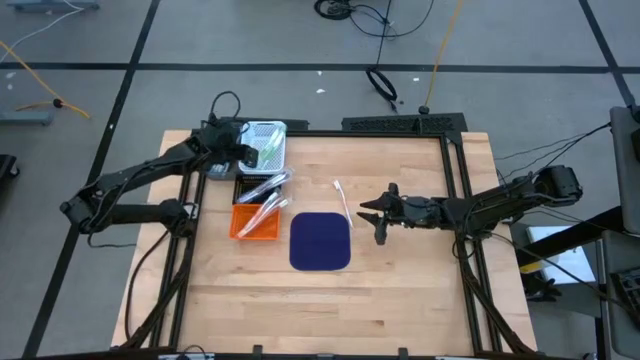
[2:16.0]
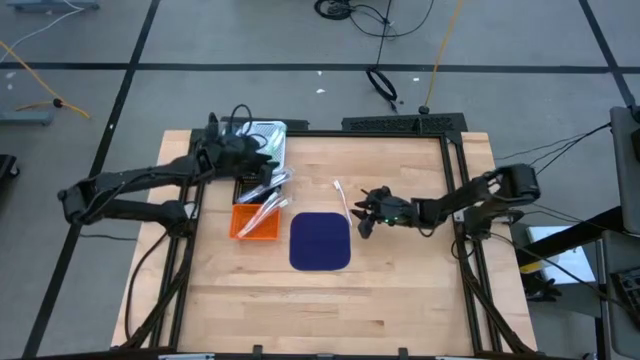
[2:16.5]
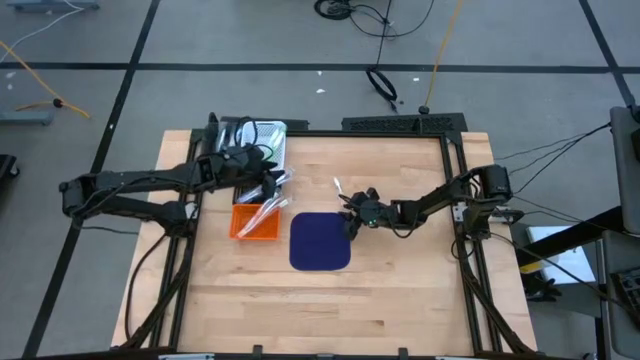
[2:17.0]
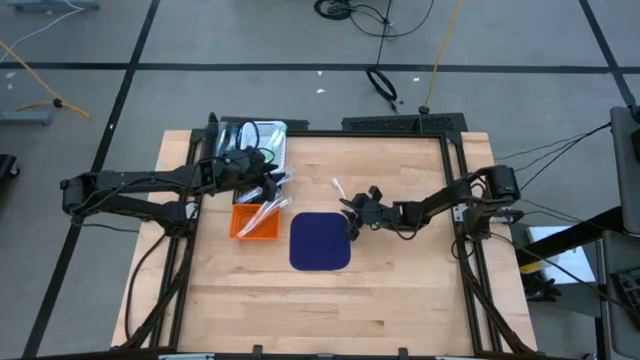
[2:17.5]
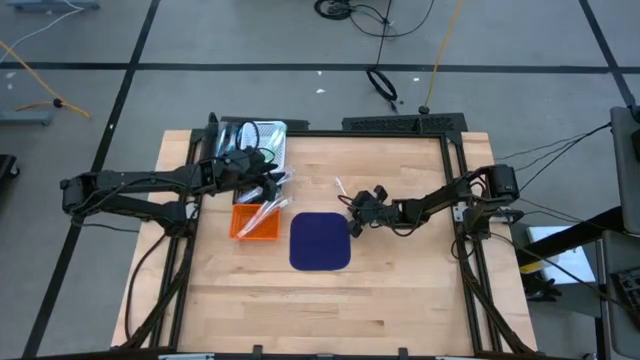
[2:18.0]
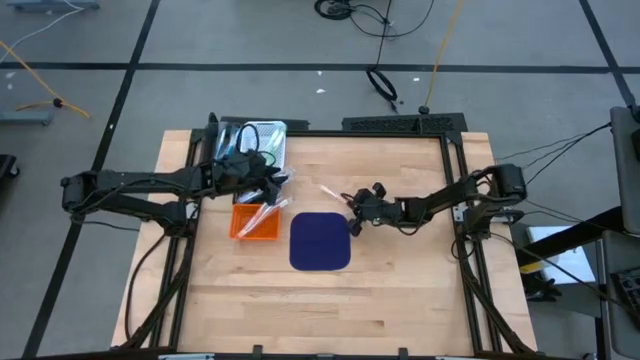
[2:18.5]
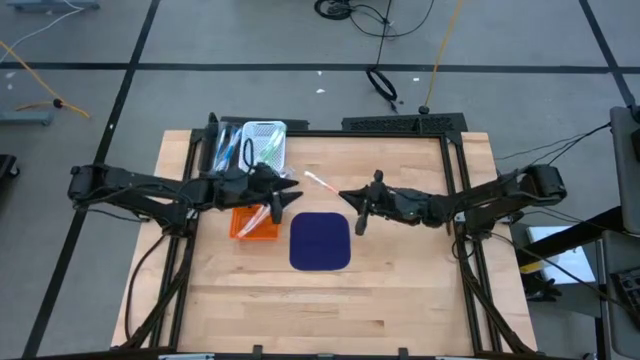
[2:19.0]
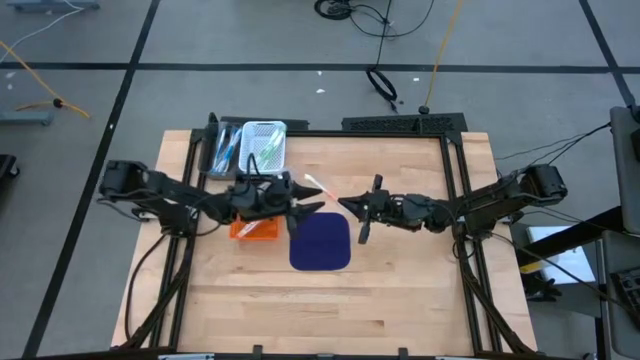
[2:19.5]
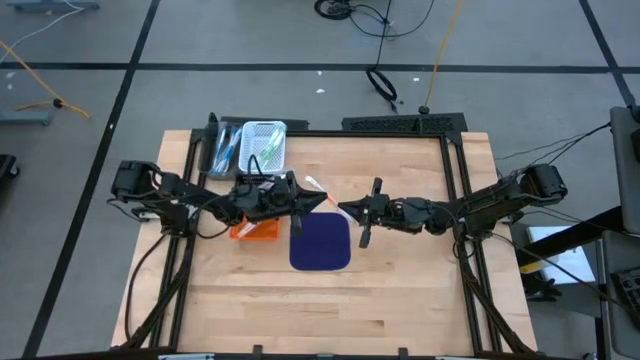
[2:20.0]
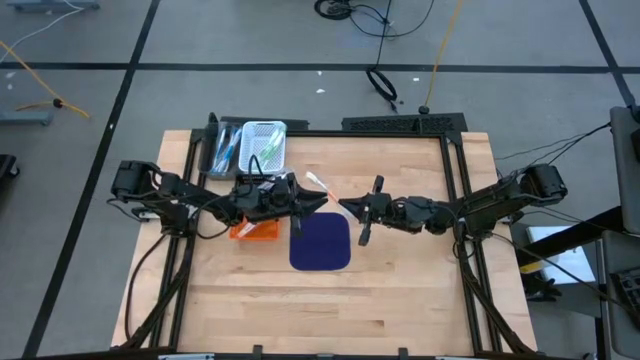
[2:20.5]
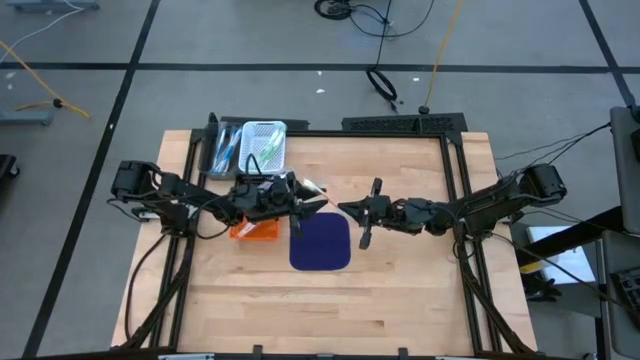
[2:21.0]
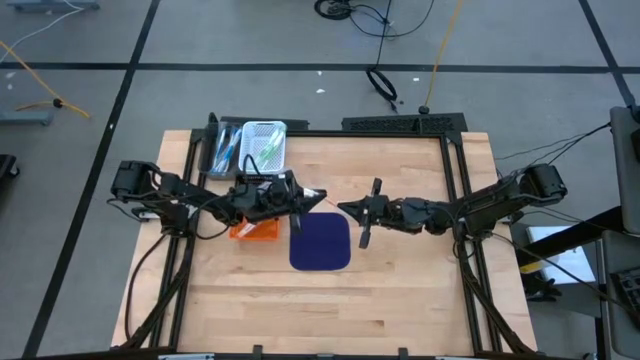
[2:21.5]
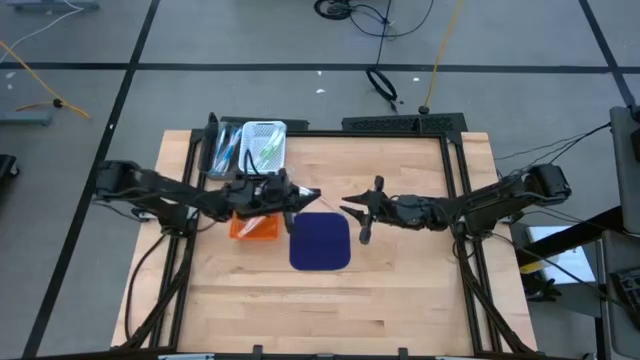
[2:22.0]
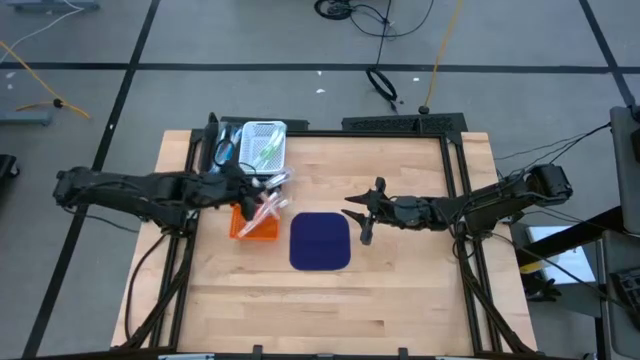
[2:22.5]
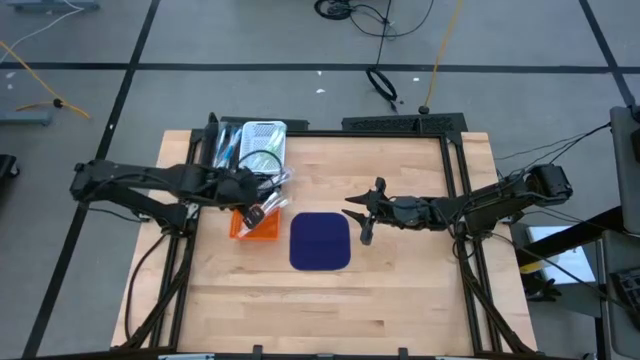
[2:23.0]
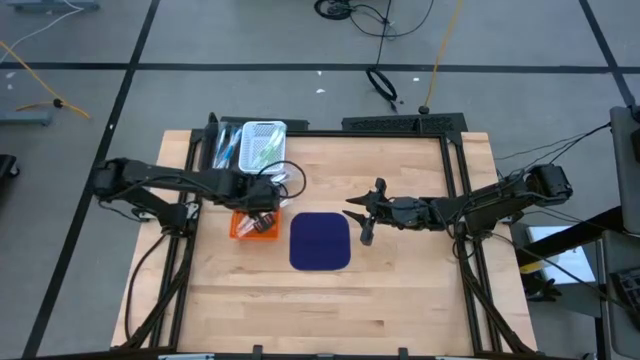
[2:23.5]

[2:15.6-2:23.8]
Task: Pick & Place Toothbrushes
Put the orange toothbrush into the orange bin

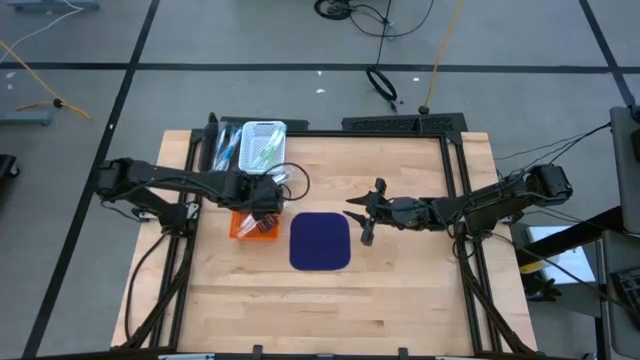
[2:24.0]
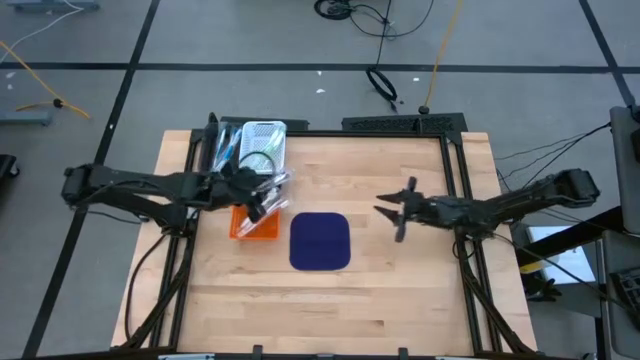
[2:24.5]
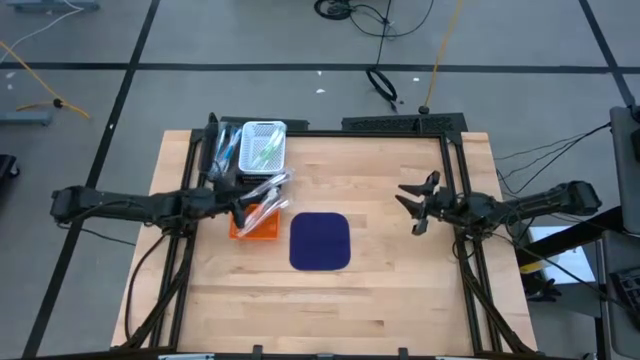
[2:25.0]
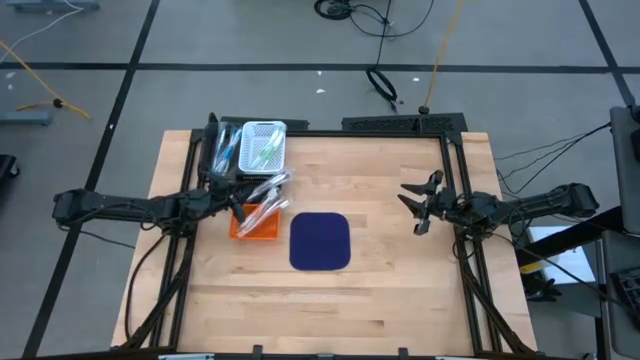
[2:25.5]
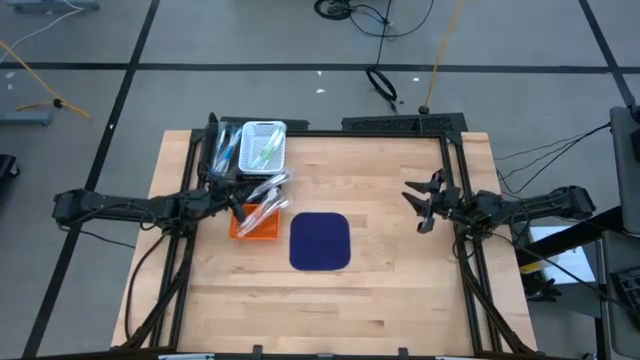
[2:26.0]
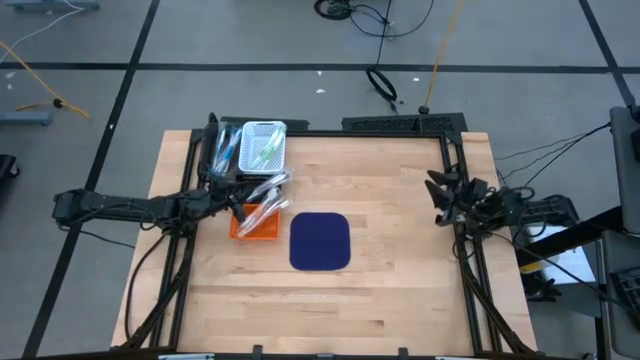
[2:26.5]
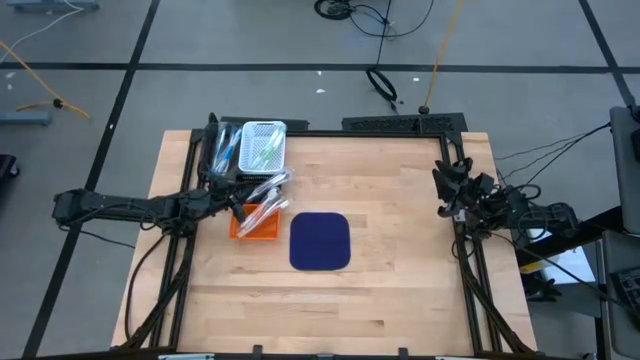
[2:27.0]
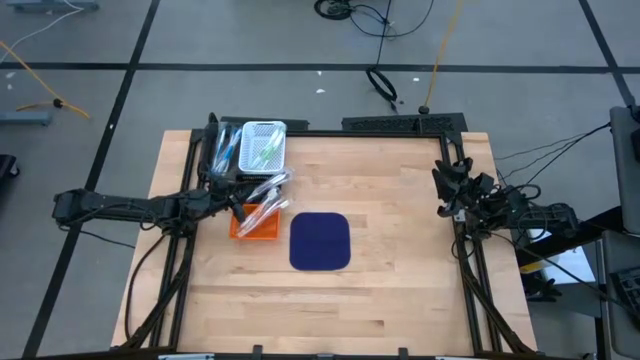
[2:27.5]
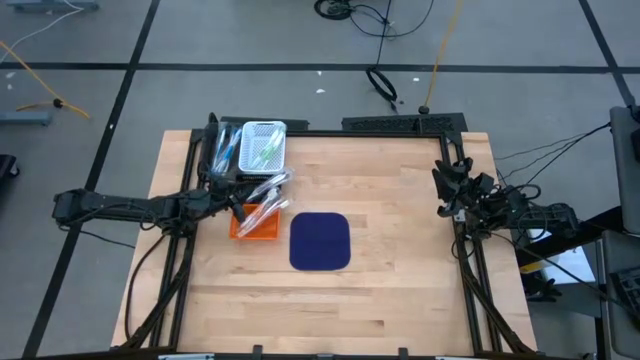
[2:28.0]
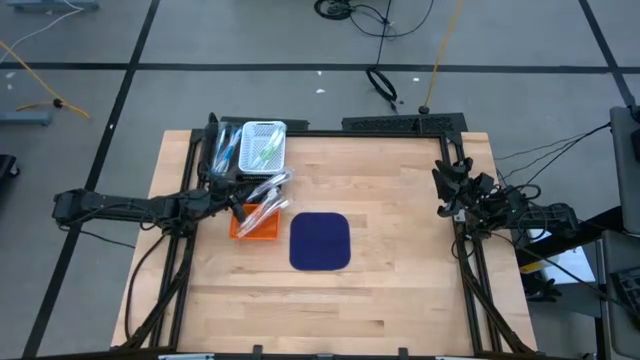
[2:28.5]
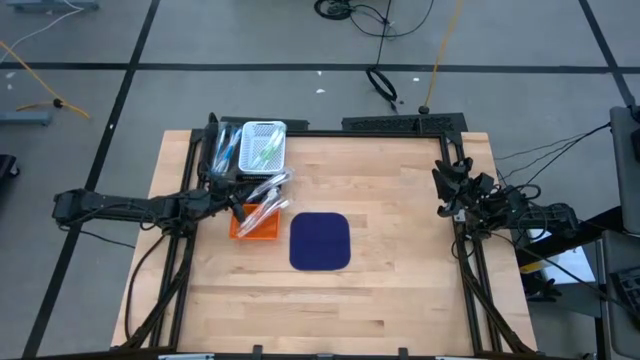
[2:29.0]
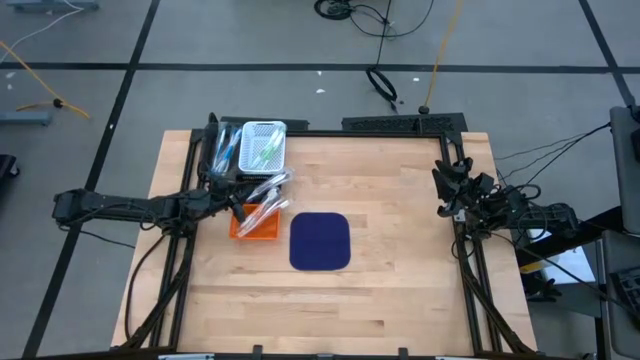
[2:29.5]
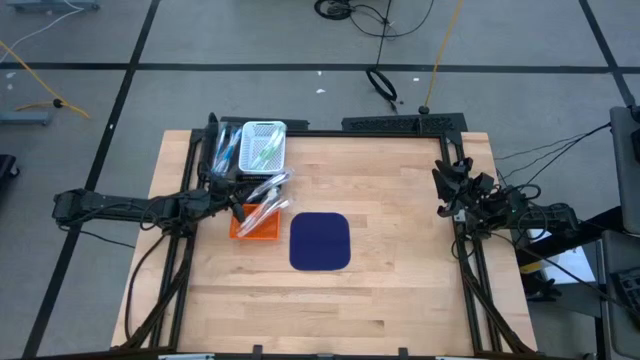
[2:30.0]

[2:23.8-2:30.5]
Return to Home Position

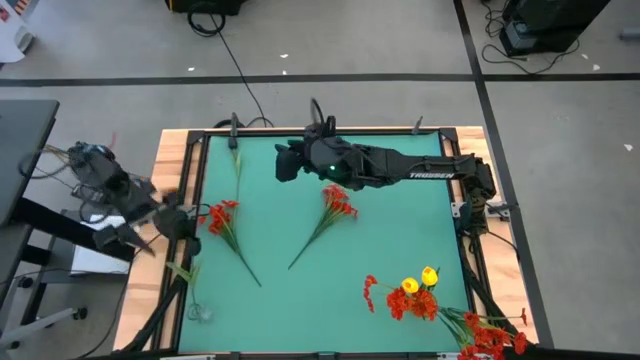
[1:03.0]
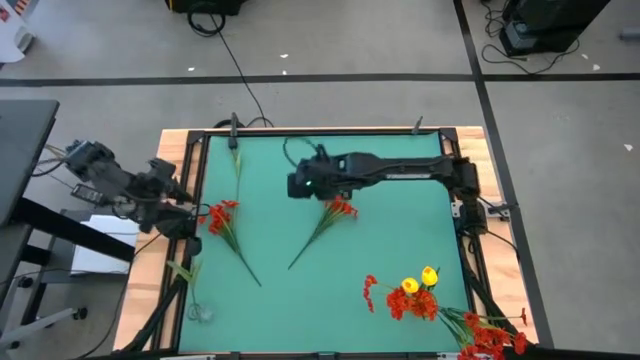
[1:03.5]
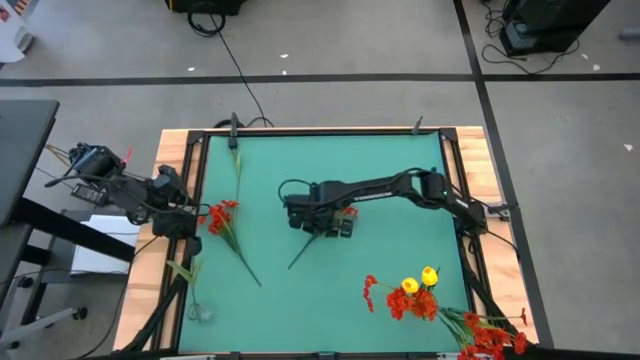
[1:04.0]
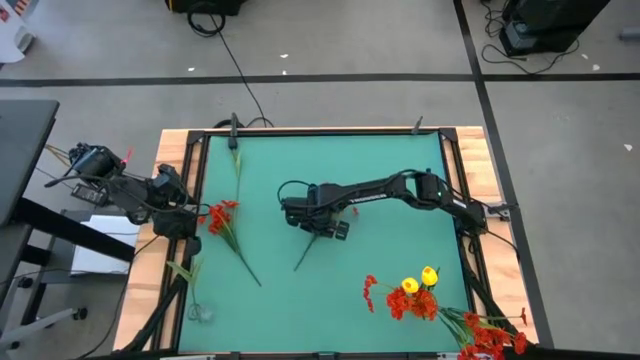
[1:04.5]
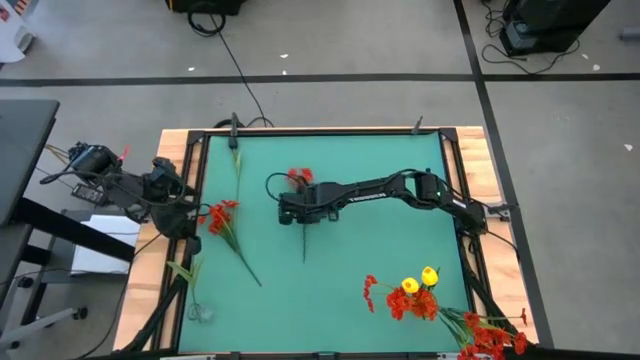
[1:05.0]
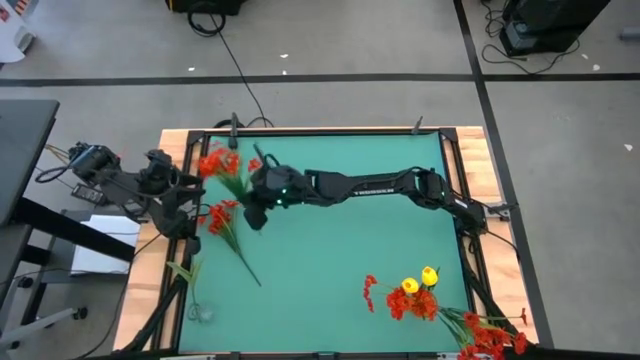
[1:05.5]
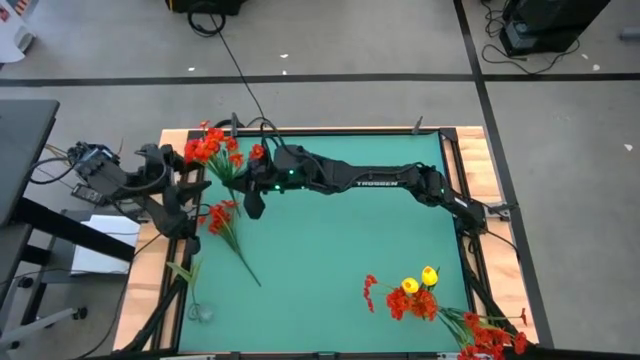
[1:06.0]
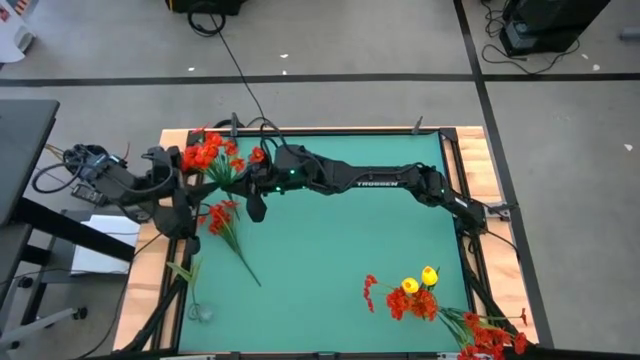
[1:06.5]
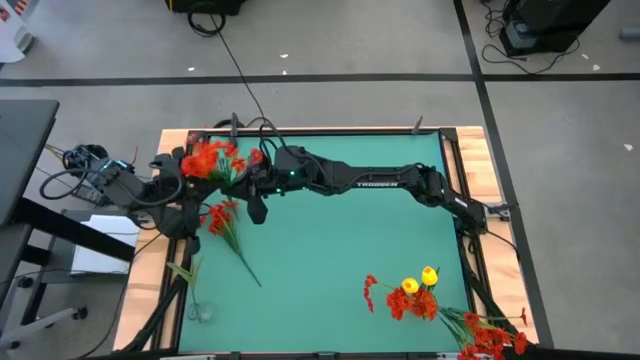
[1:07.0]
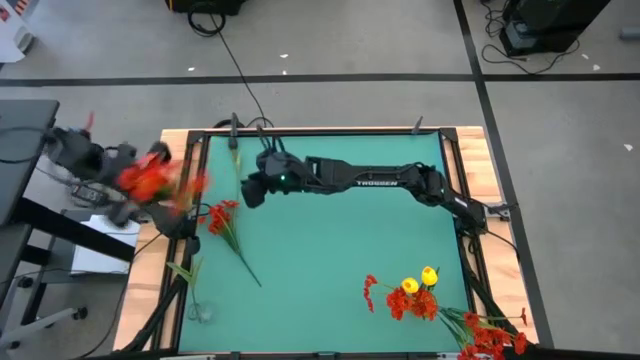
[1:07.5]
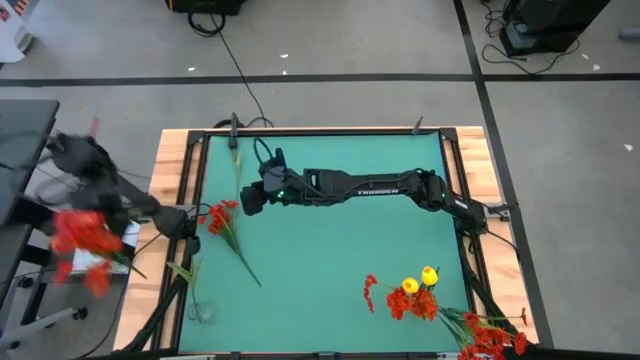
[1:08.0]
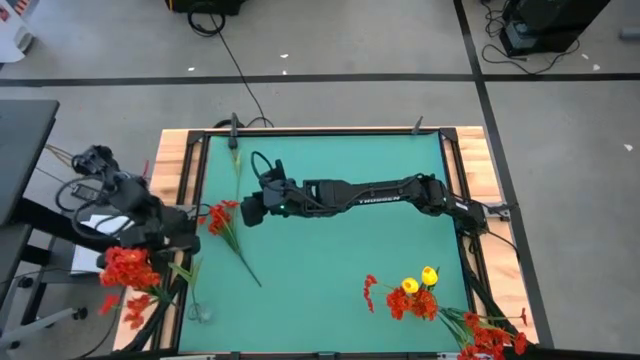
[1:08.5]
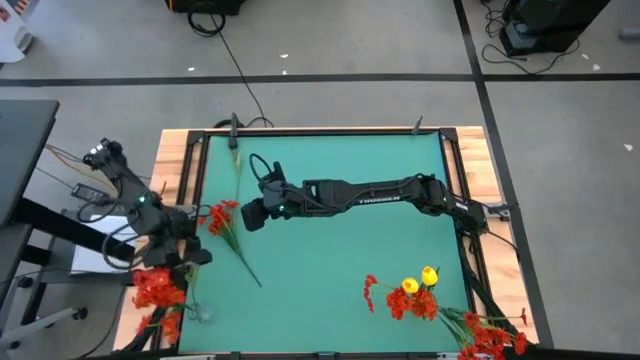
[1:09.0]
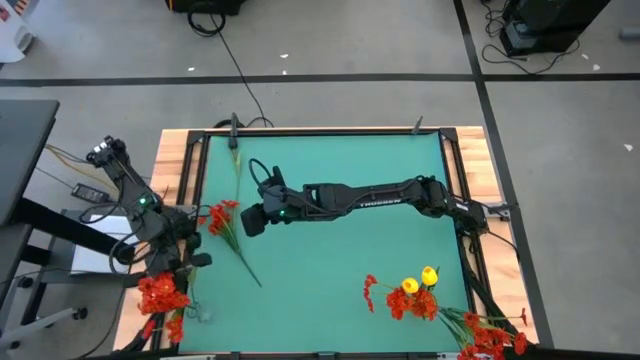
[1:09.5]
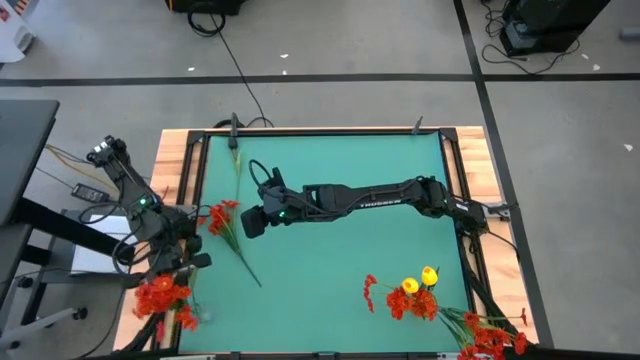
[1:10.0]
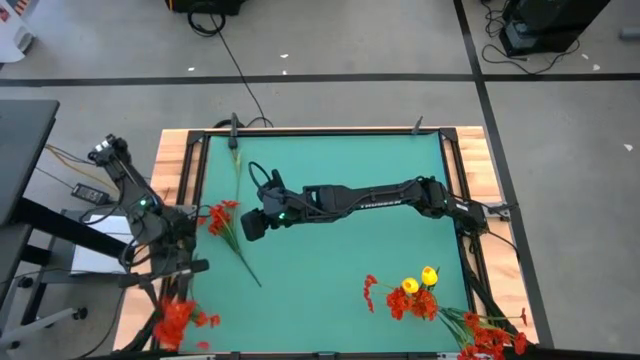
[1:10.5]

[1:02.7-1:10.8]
Task: Sort flowers into vase by color
Put the right red flowers into the transparent flower vase
